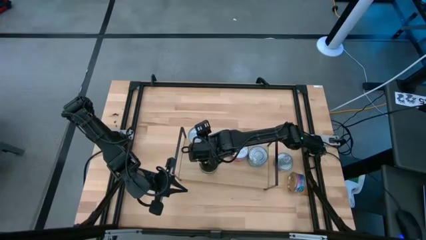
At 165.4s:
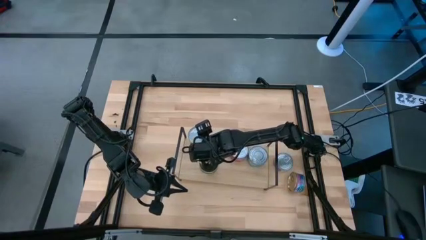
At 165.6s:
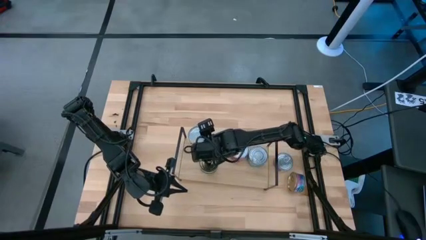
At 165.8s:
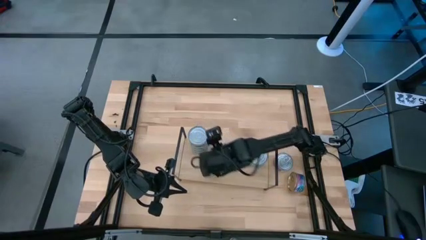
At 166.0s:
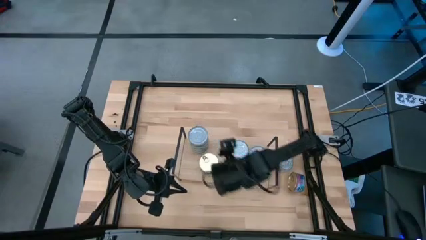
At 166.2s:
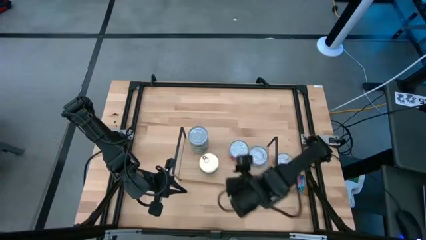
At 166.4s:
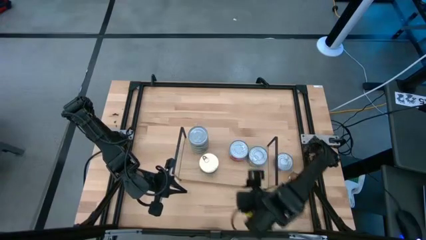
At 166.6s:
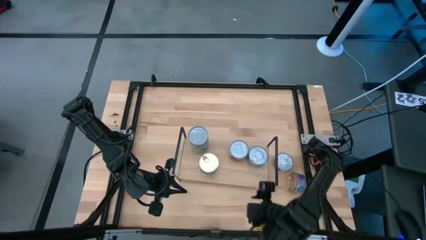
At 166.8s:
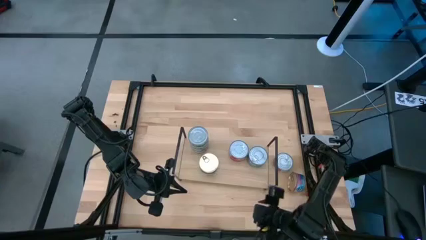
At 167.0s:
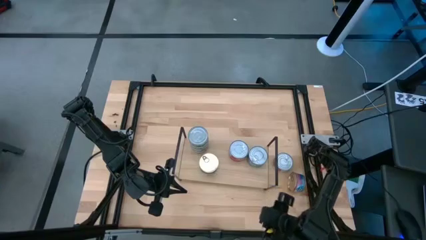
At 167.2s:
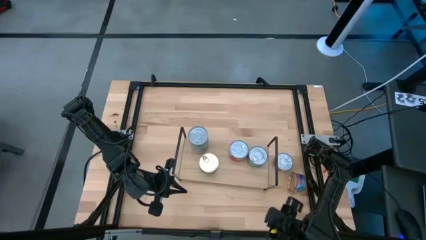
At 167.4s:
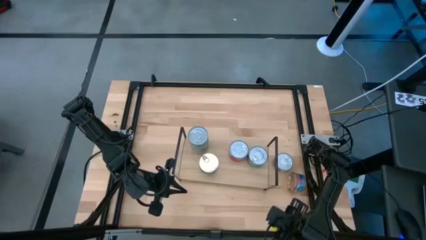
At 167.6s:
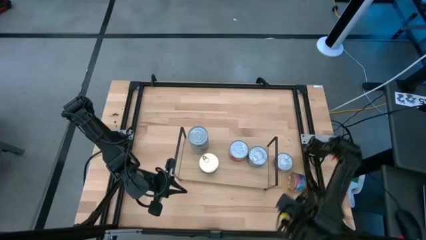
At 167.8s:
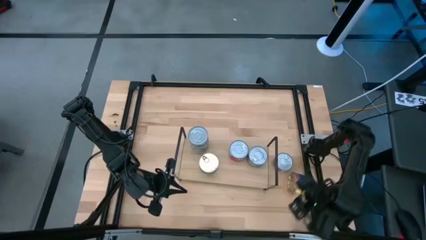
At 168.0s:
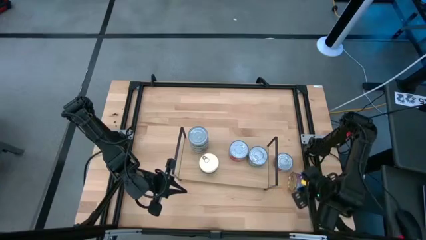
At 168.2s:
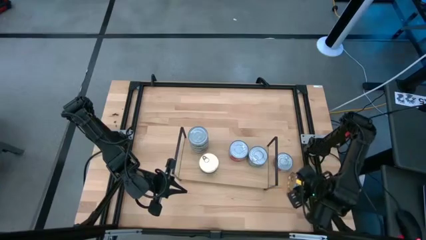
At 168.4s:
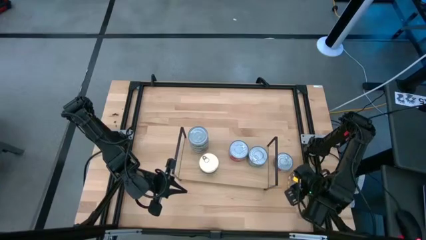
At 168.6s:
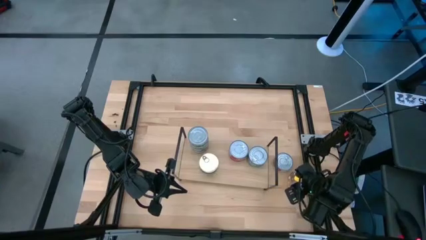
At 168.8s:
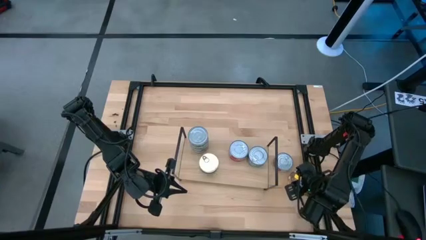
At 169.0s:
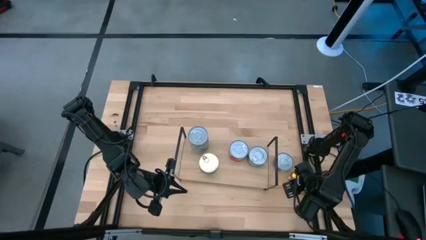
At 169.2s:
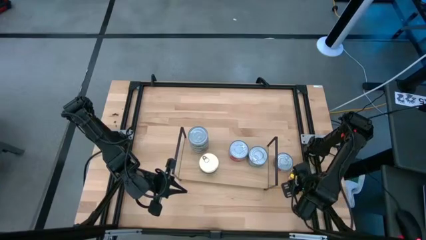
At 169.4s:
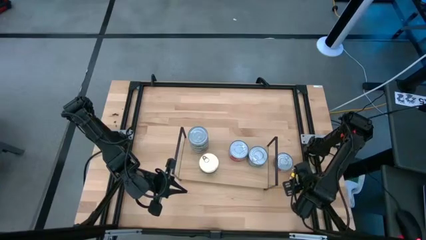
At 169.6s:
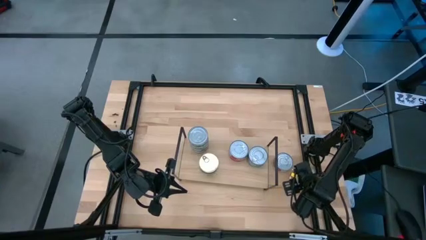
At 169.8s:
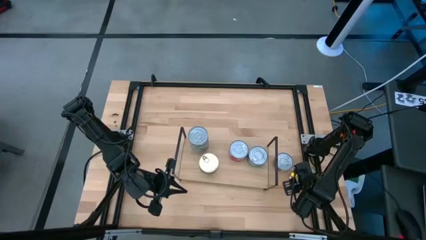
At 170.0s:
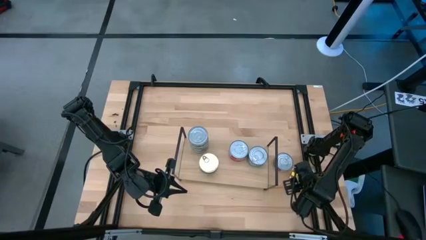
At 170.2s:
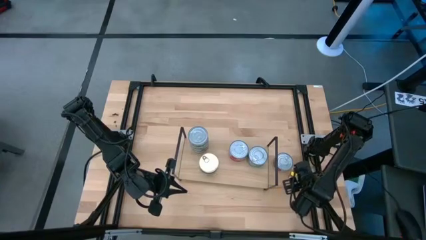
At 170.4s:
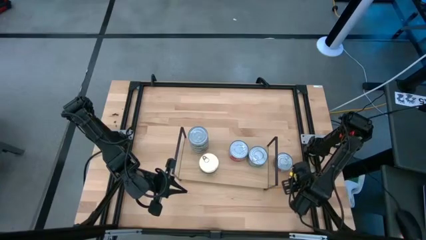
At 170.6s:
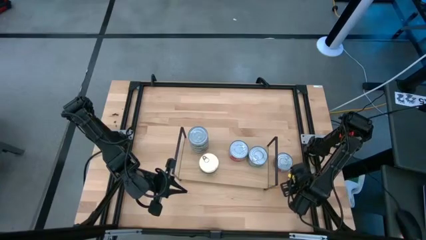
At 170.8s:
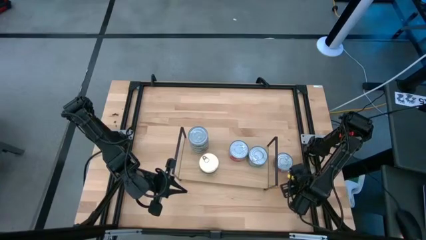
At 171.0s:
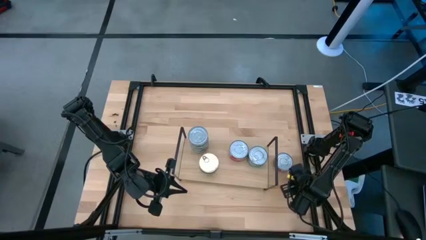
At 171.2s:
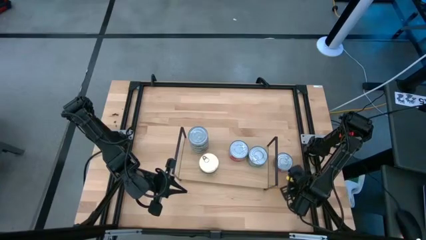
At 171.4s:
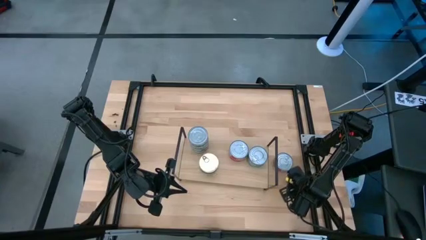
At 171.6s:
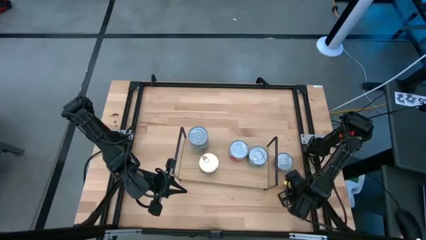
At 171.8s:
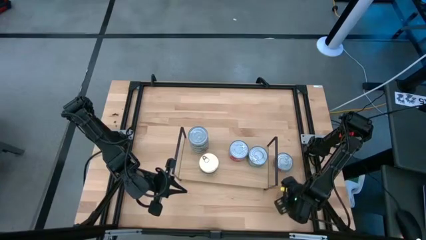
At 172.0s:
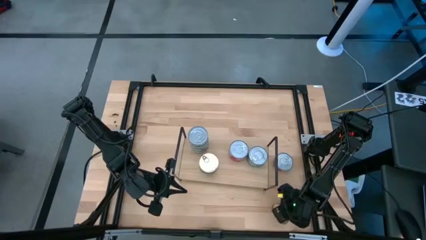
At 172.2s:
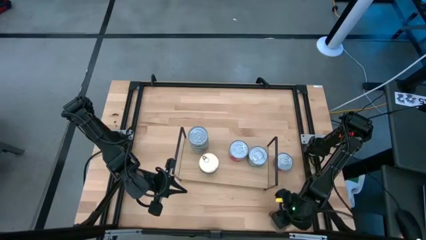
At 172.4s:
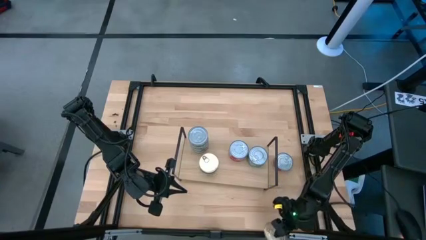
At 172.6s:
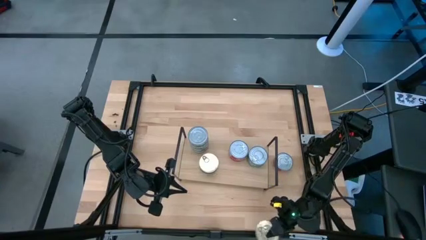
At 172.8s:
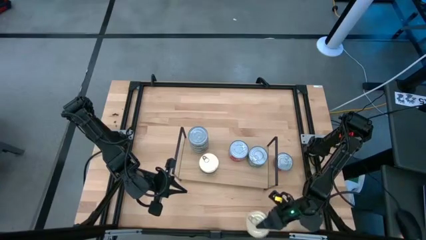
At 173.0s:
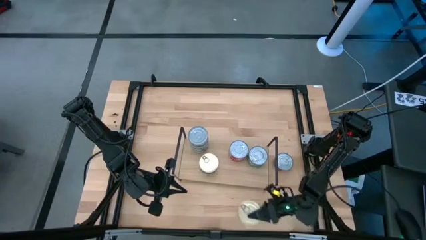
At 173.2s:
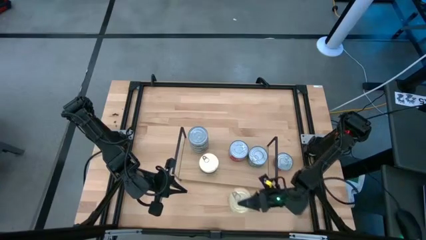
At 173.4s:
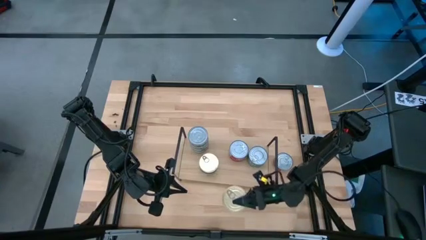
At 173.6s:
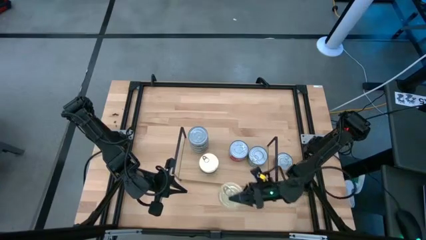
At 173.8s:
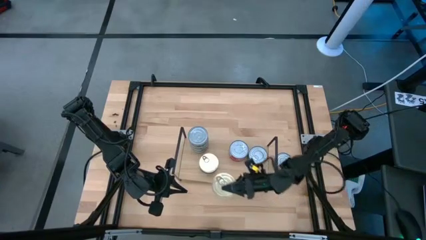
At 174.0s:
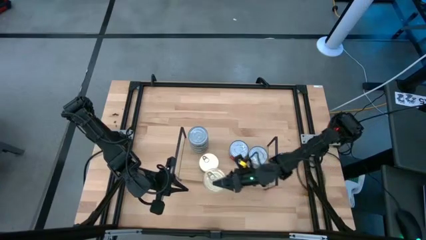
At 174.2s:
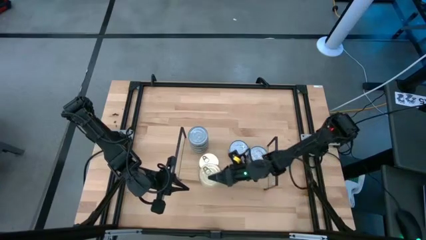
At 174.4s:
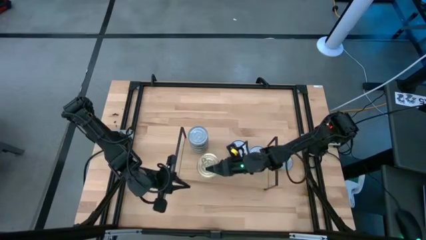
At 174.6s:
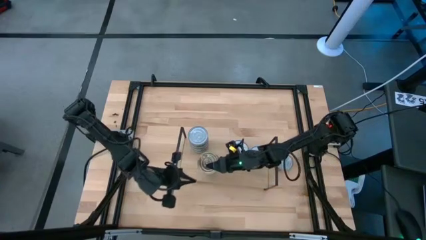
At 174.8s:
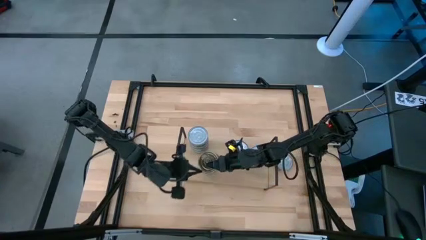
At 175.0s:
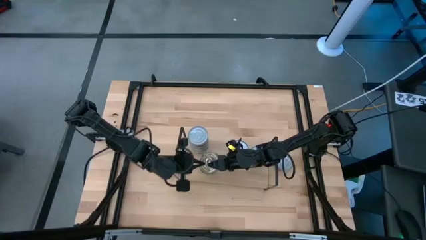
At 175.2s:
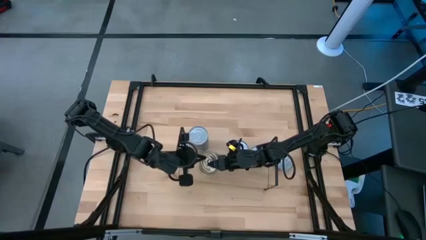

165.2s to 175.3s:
Task: Stack canned seafood by type on shelf
Stack the blue pink tuna can on top of the blue pink tuna cans on the shelf

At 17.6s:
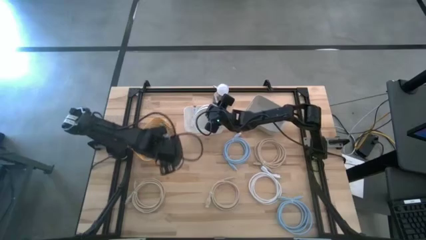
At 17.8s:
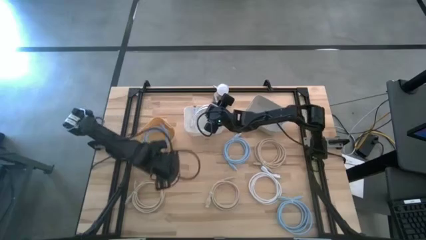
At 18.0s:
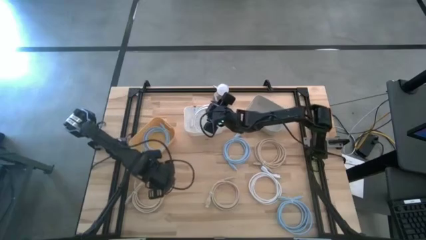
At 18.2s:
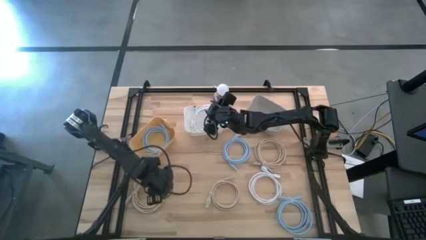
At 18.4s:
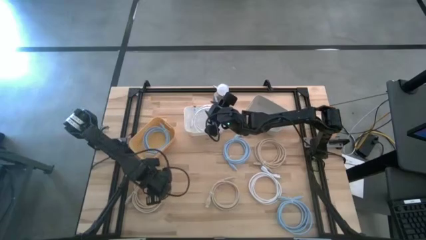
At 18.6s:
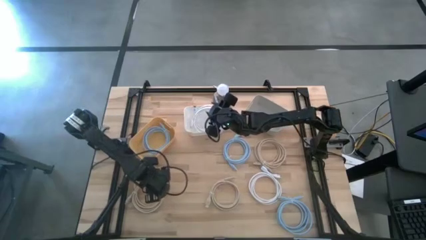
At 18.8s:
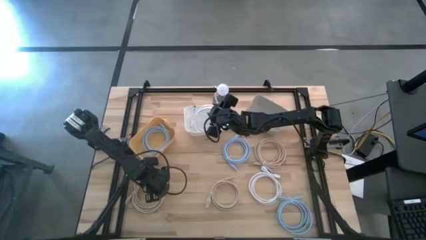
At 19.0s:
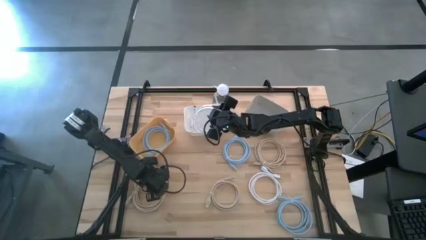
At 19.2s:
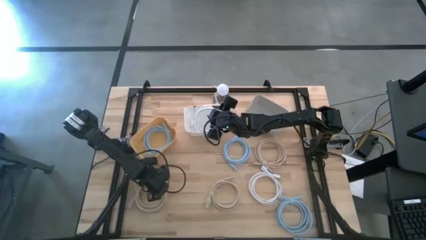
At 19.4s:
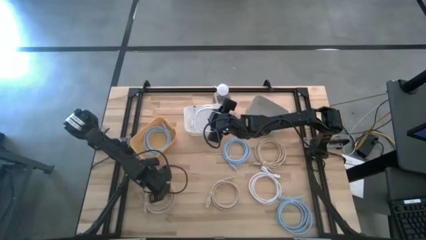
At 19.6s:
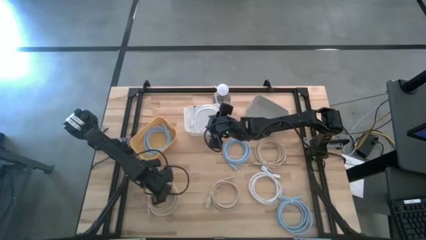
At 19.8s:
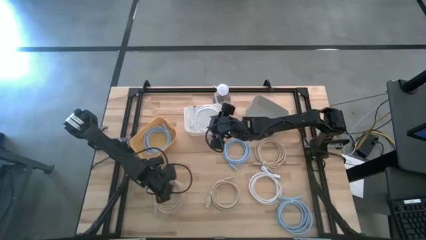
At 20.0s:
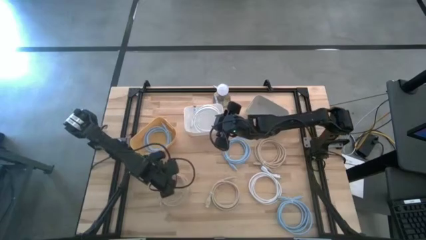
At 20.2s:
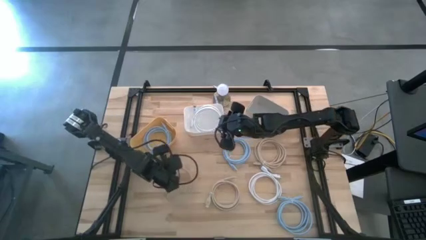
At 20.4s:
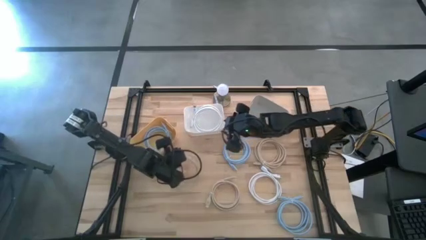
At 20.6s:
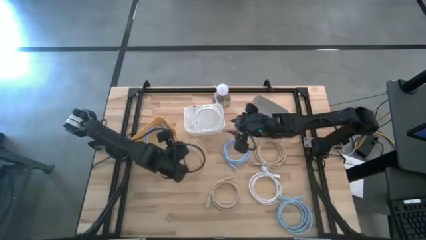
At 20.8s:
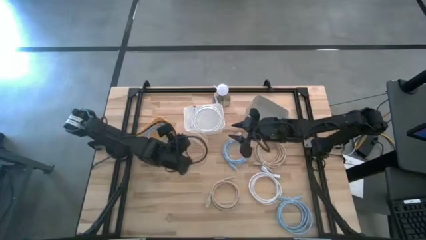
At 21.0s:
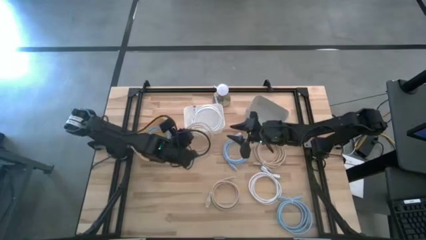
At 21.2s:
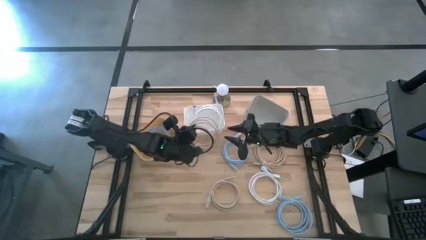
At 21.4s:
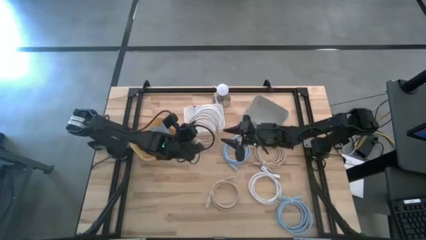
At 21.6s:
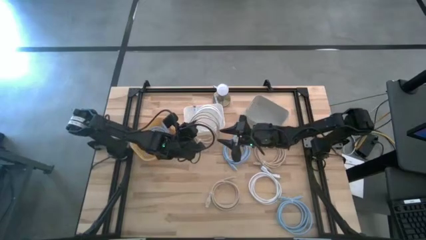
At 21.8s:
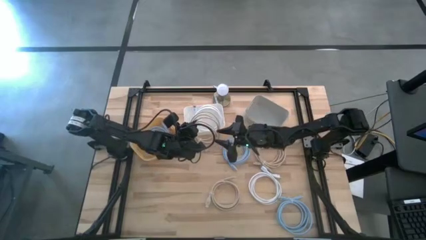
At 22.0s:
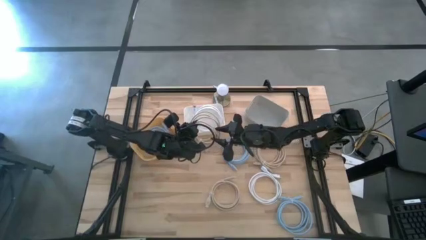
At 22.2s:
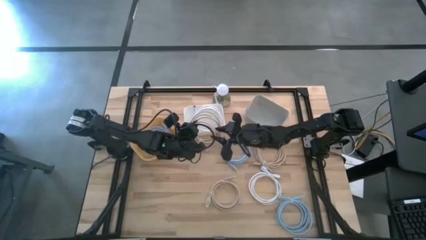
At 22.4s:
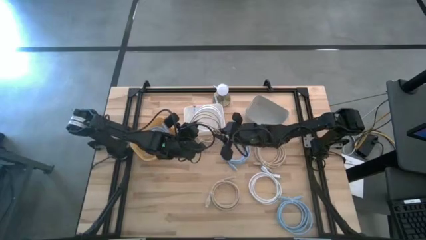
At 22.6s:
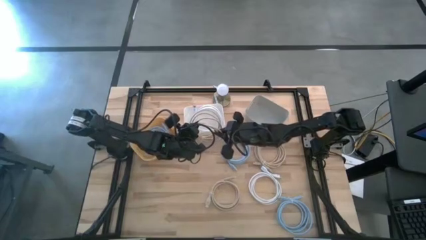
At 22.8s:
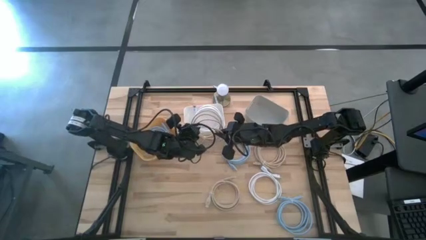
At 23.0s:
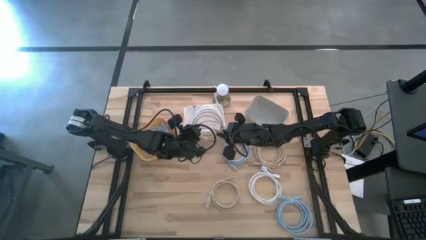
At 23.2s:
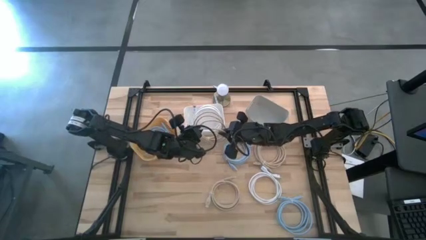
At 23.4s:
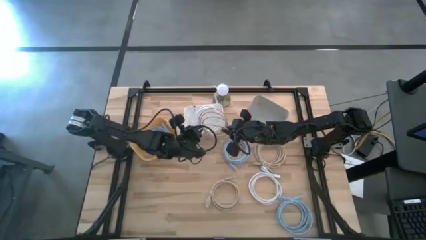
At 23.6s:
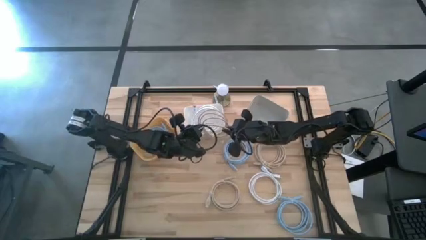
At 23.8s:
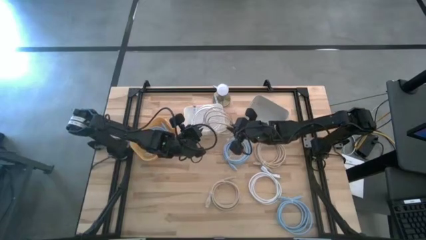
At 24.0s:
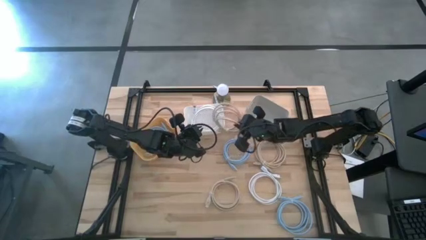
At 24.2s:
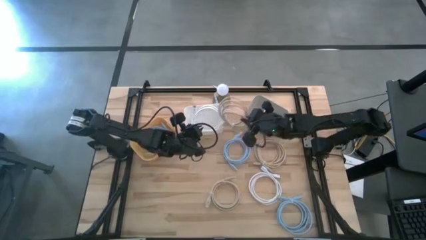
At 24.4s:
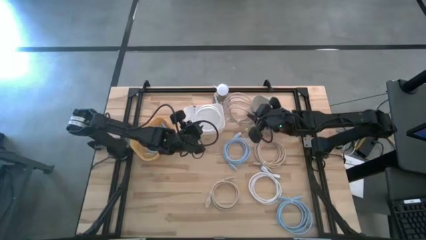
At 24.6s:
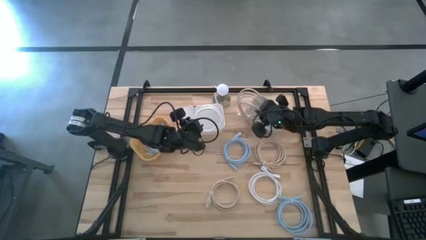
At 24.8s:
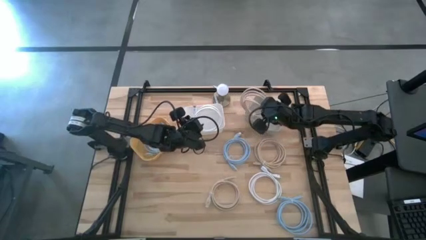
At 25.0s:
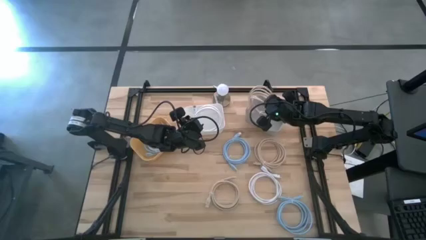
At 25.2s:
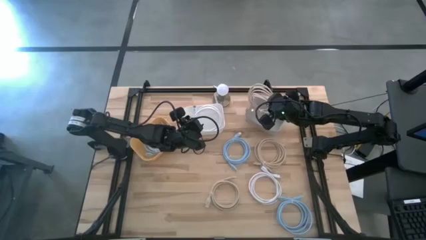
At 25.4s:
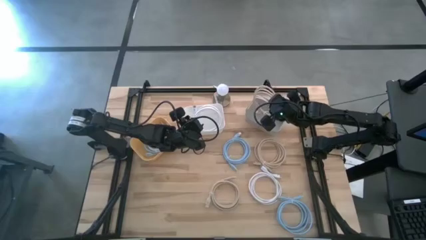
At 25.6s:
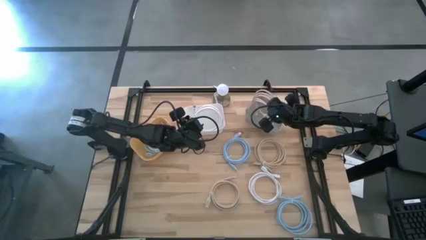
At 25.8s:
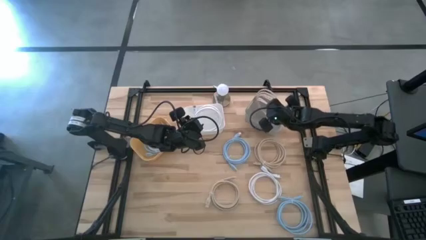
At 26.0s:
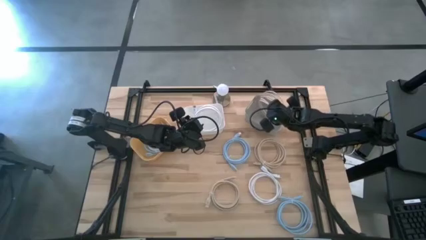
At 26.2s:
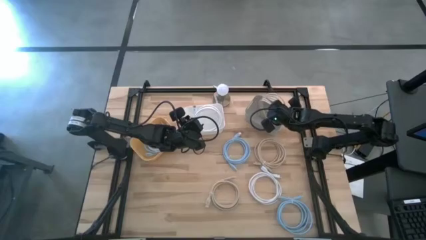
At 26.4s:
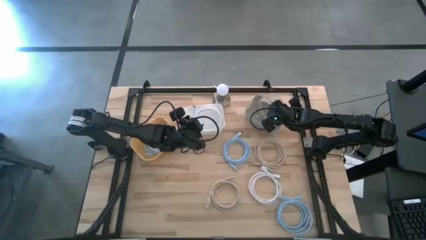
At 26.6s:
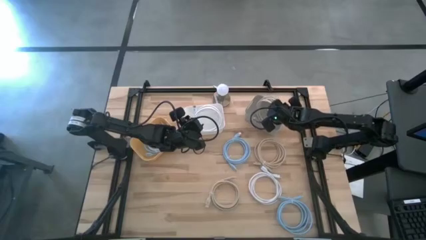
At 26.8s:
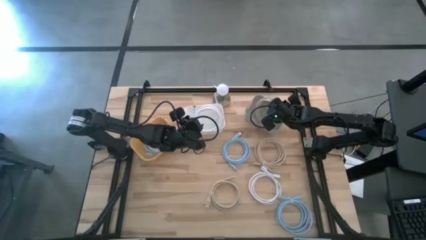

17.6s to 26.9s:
Task: Sort HDMI cables
Put the bottom left brown hdmi cable into the gray bin
